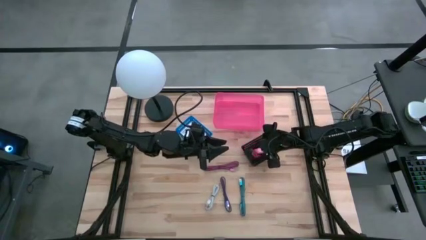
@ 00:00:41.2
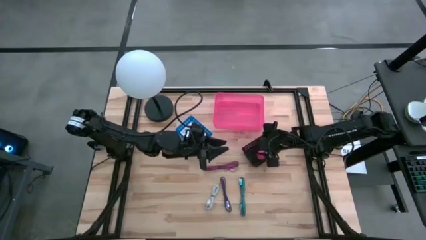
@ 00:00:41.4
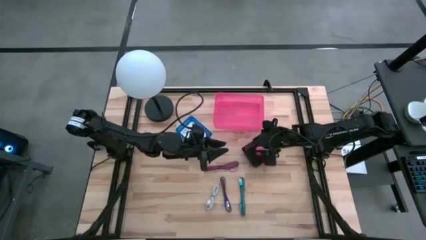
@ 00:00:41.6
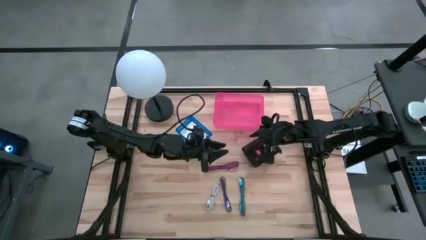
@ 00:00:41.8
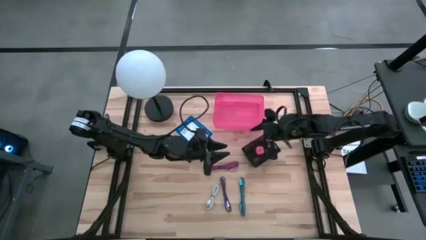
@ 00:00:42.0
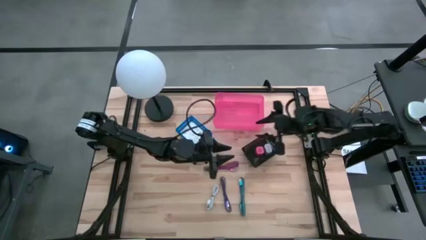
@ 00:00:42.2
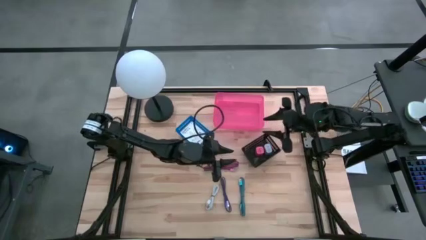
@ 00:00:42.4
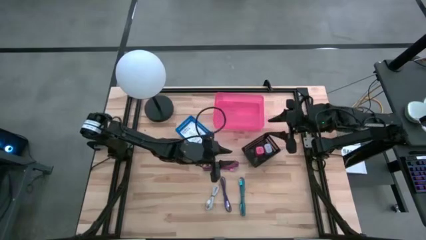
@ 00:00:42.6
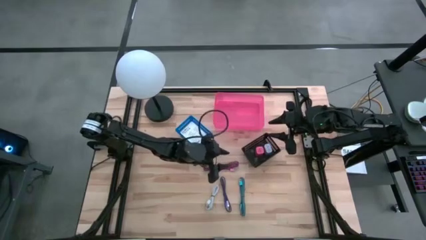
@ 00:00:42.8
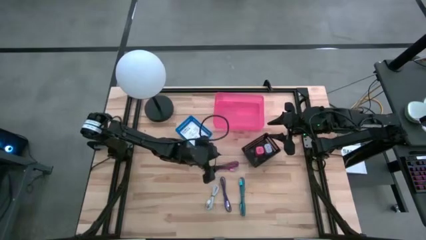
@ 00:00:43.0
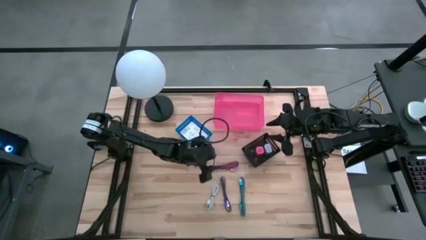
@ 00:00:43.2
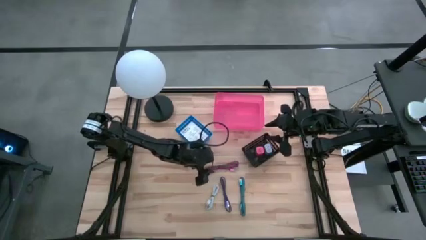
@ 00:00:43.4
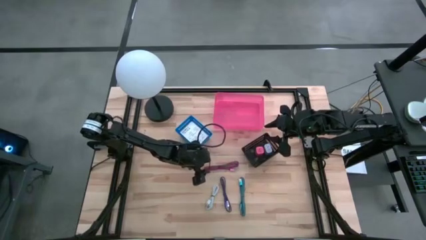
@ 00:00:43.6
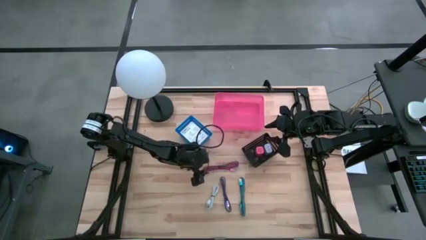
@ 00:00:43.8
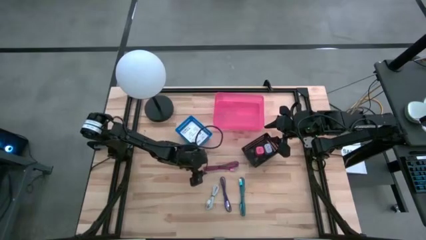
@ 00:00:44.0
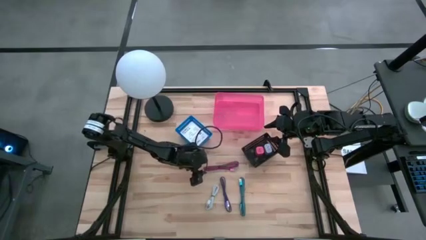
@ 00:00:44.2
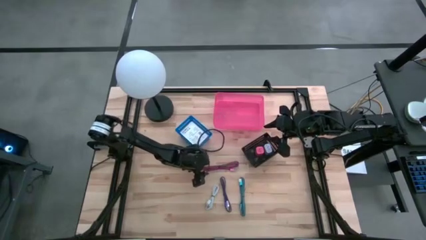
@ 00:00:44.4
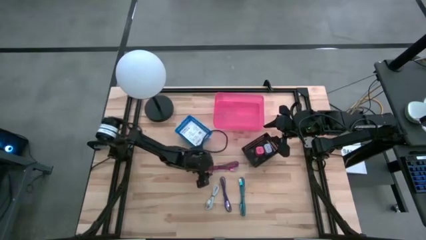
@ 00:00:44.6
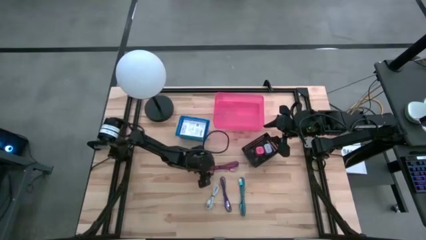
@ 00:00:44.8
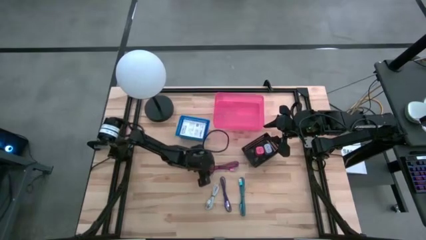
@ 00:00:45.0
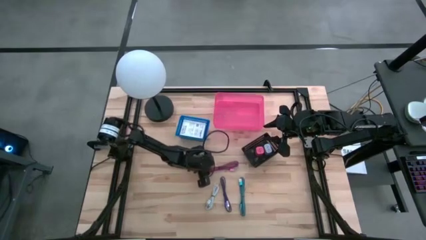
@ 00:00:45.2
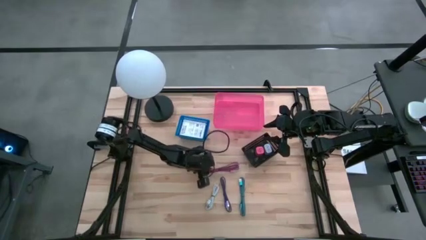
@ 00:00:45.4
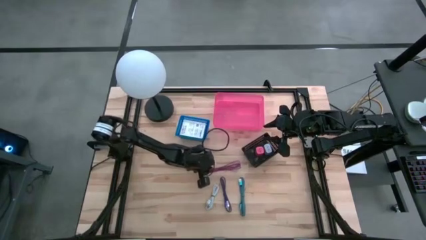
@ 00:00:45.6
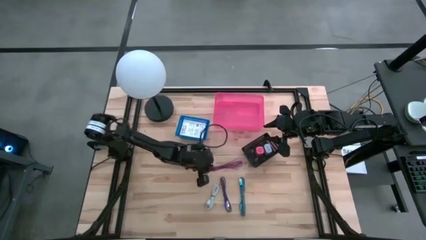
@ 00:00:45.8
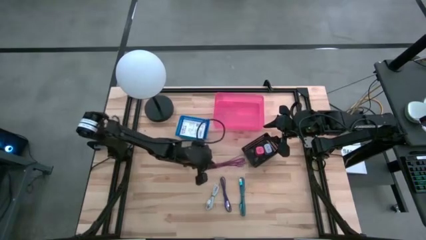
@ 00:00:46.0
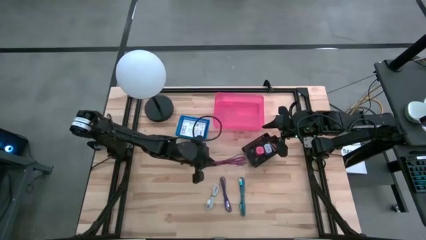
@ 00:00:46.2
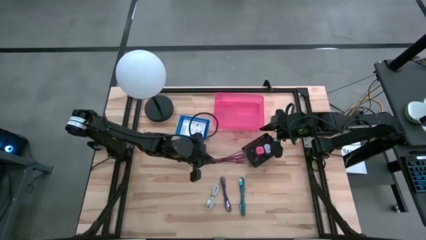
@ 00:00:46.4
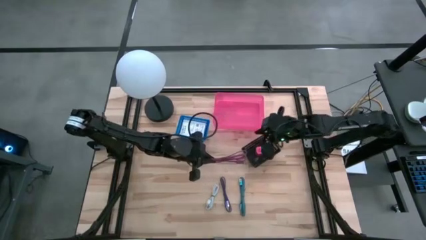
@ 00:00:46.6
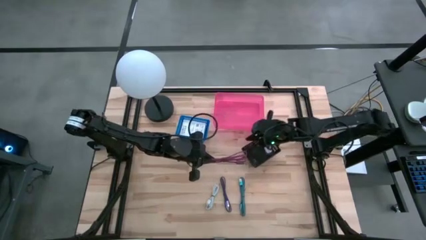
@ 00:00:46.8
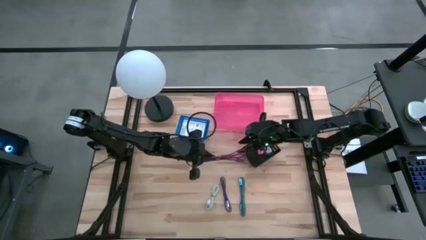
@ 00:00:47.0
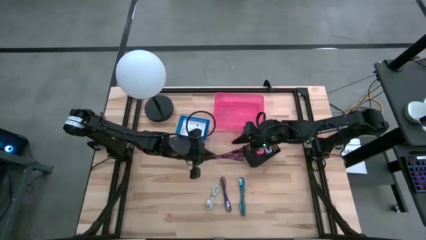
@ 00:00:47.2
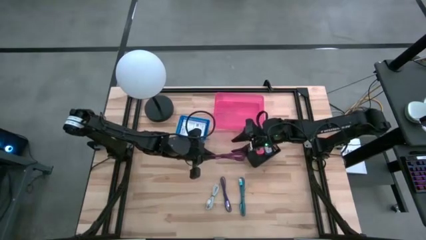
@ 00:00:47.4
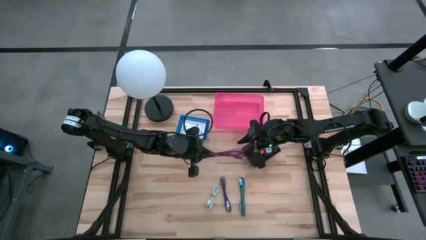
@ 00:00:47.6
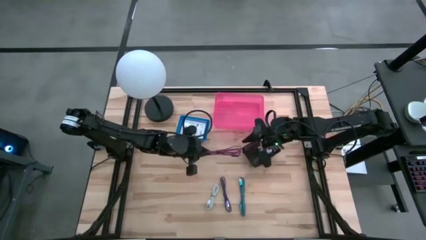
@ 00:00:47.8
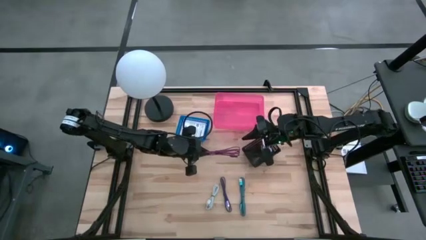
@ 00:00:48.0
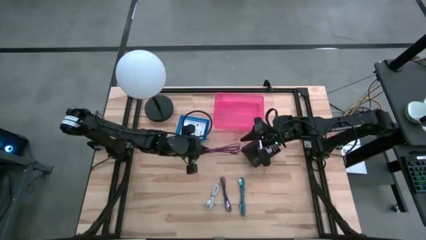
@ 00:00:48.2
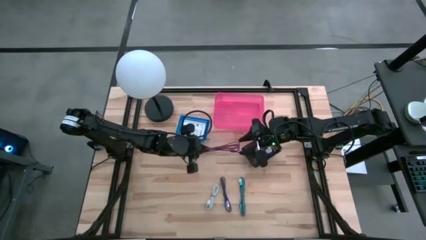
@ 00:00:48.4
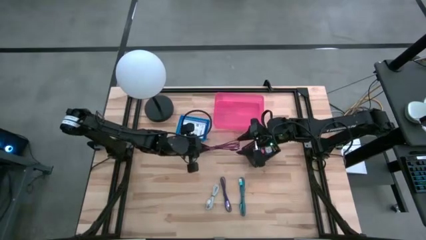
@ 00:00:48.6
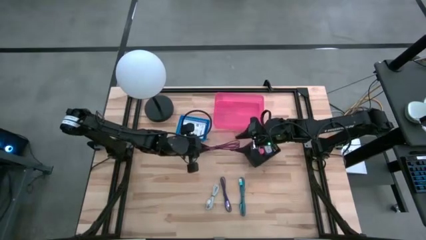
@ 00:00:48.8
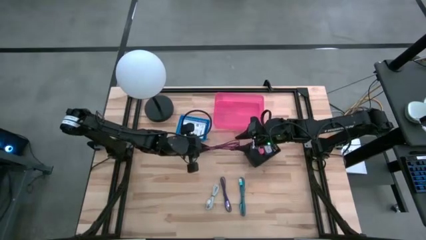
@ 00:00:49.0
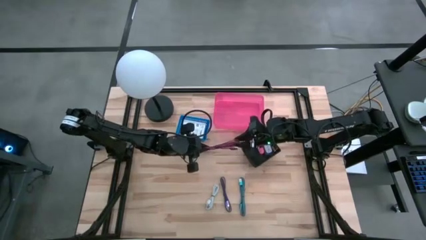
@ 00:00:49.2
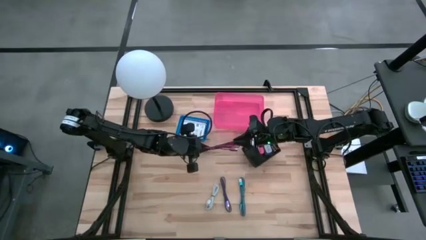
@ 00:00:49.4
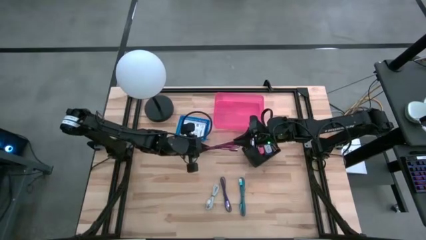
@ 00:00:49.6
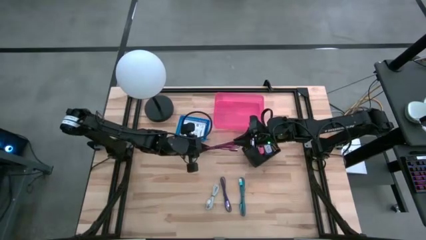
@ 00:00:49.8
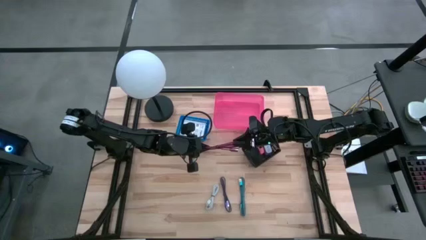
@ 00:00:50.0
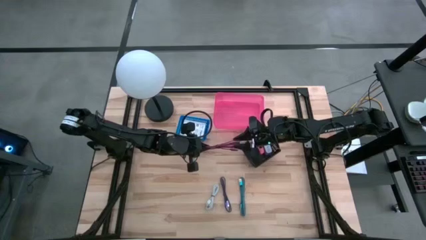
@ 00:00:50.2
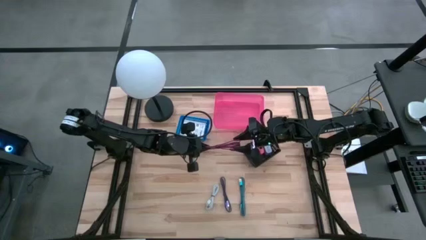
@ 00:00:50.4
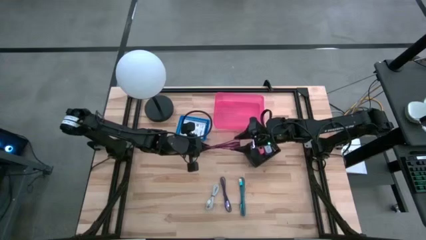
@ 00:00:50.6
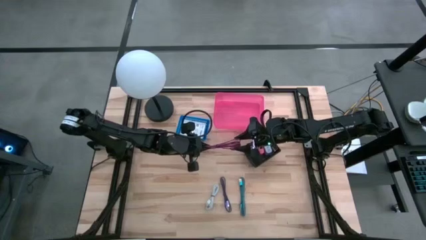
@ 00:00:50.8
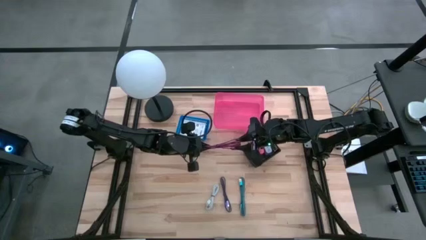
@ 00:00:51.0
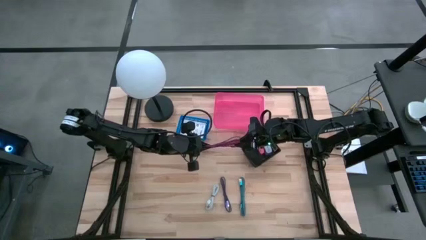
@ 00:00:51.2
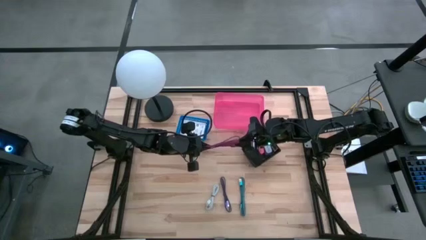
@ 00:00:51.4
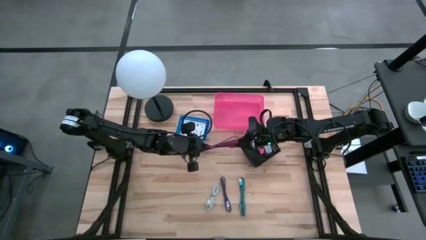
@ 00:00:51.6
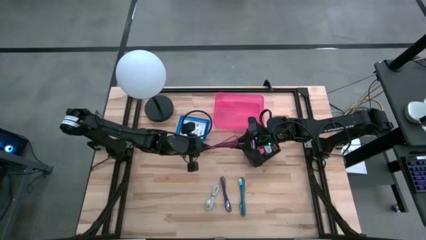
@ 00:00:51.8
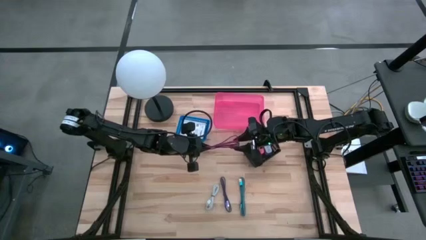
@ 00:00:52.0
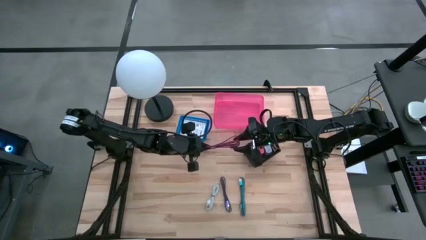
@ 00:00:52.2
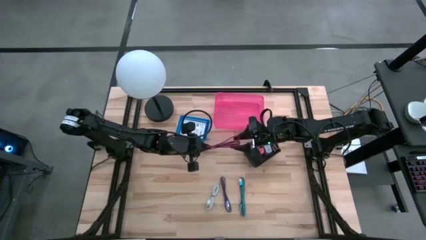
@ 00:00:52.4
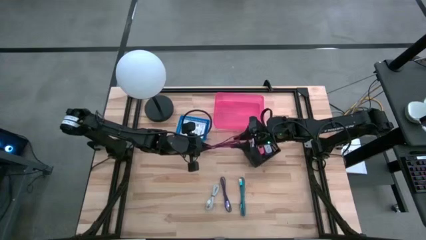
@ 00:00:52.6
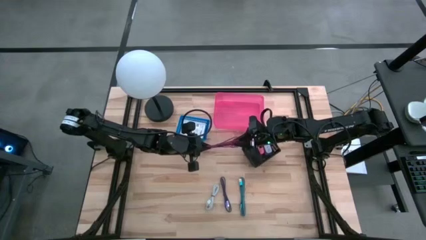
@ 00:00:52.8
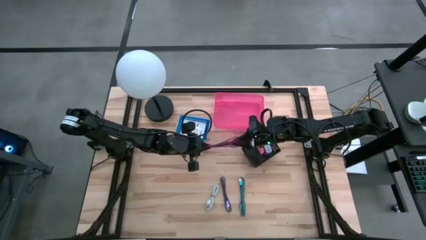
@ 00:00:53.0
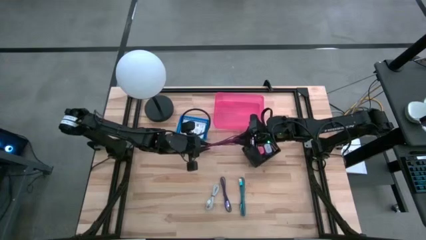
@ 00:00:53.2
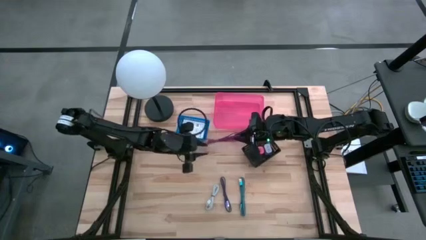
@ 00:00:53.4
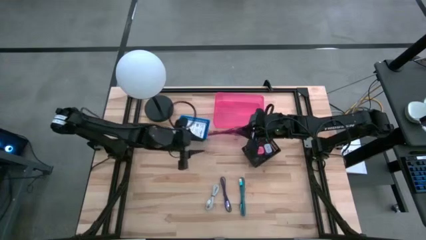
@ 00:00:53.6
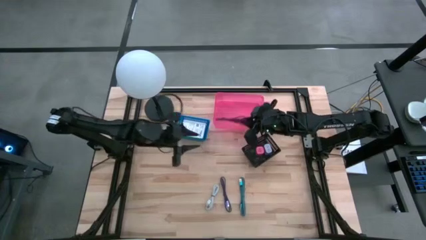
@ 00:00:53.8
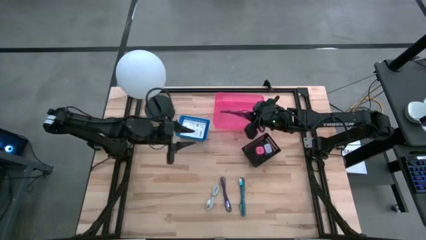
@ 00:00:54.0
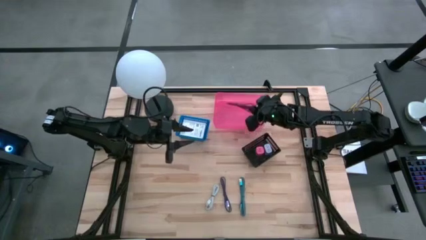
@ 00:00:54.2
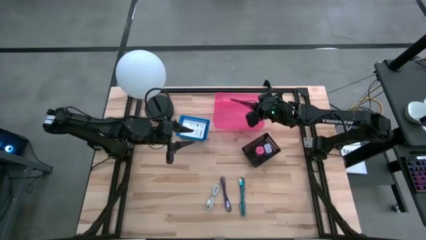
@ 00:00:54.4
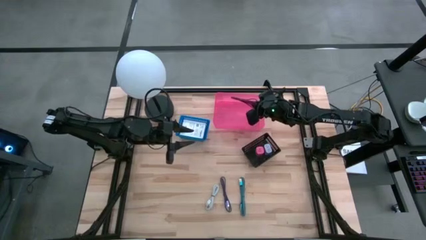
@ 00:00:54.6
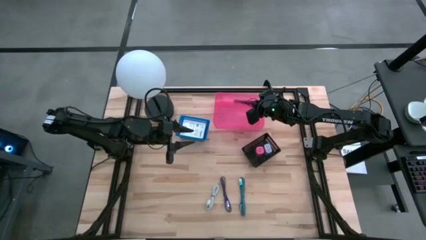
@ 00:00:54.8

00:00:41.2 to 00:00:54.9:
Task: Pick and place items into bin
Put the pink charger cable into the pink bin
